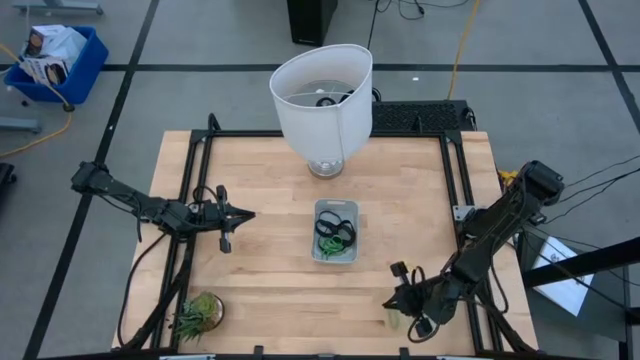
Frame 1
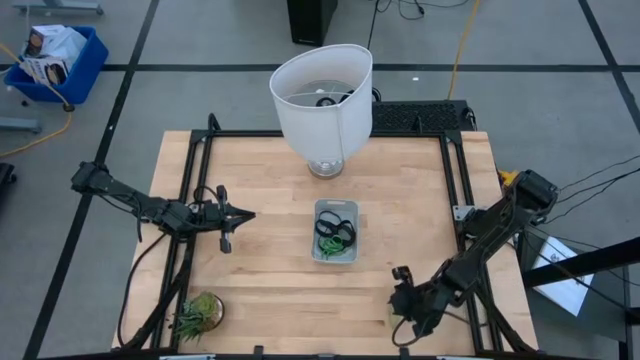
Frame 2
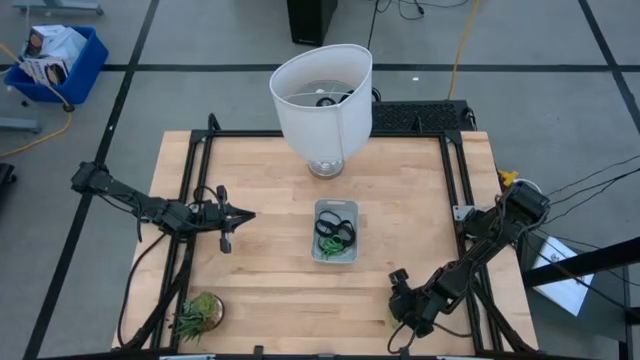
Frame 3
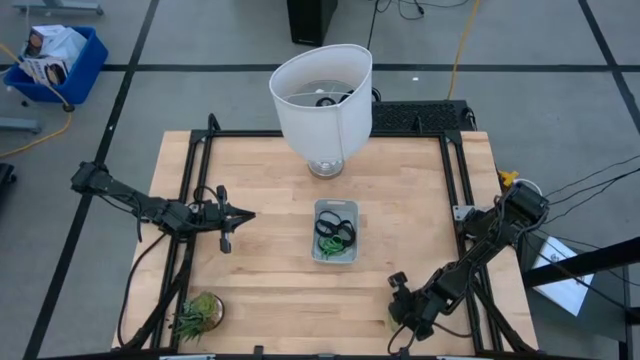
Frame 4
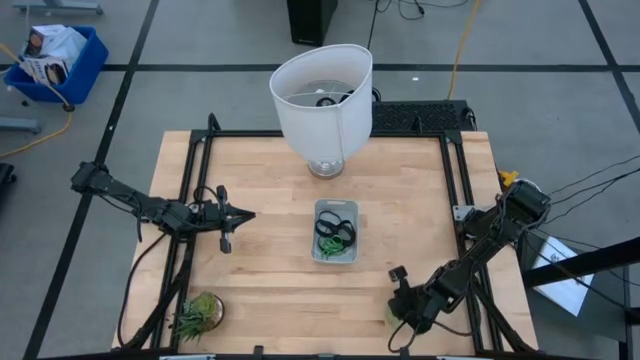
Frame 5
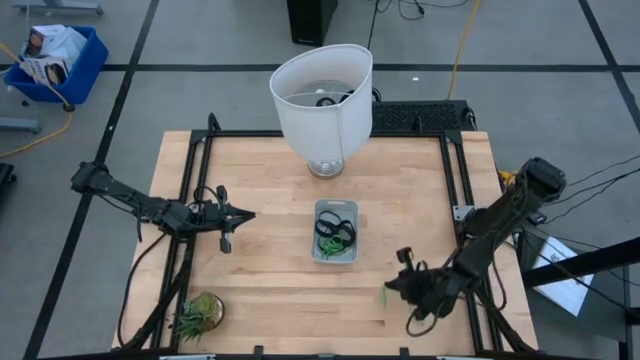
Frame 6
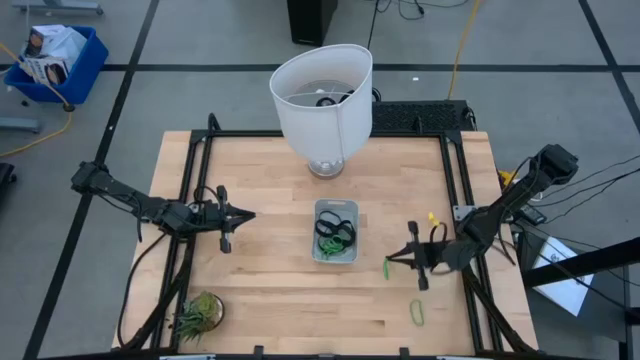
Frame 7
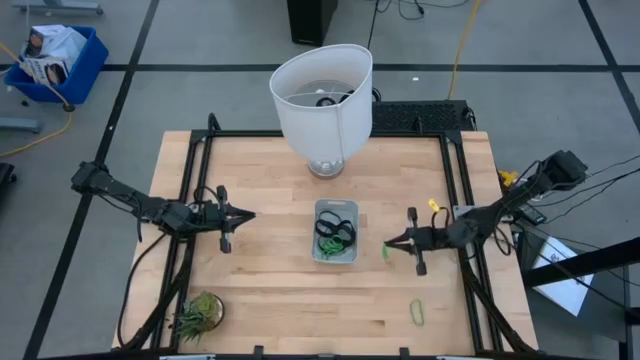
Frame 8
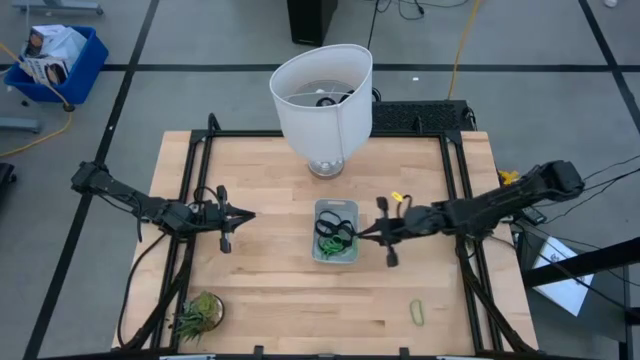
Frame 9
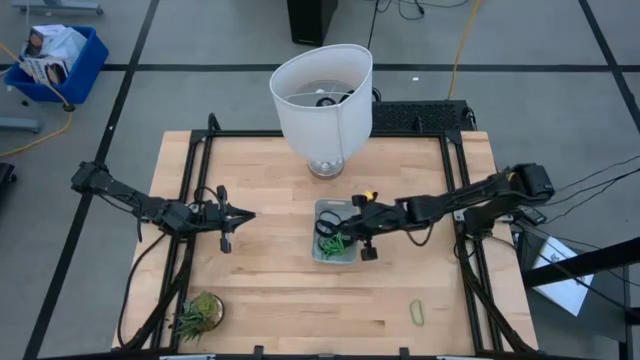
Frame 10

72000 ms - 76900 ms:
Task: Pick and place rubber bands into bin
Put the green rubber band into the gray bin

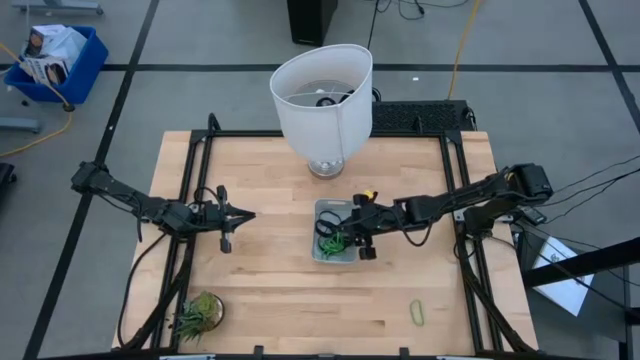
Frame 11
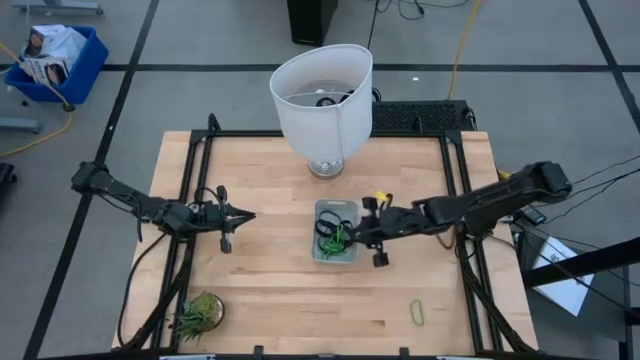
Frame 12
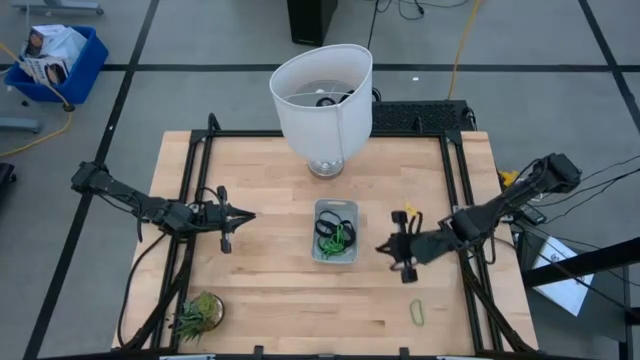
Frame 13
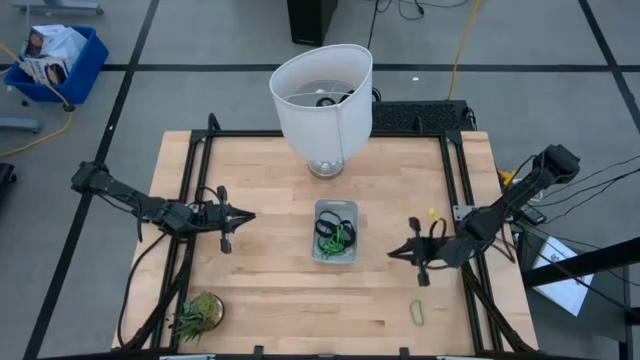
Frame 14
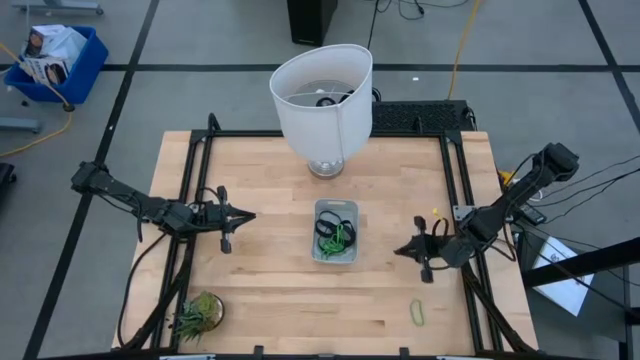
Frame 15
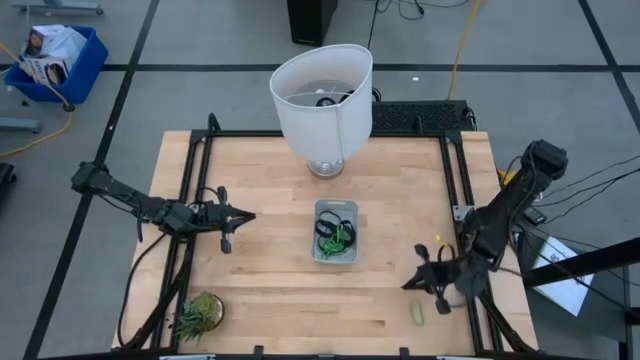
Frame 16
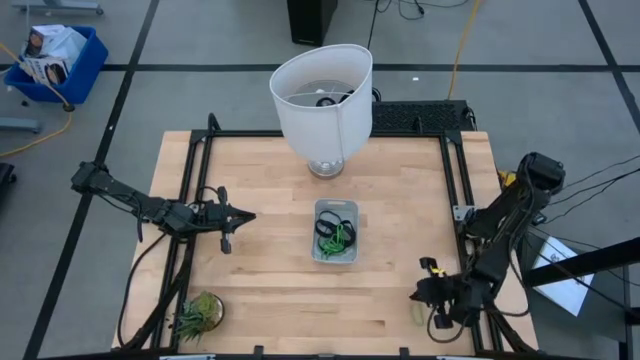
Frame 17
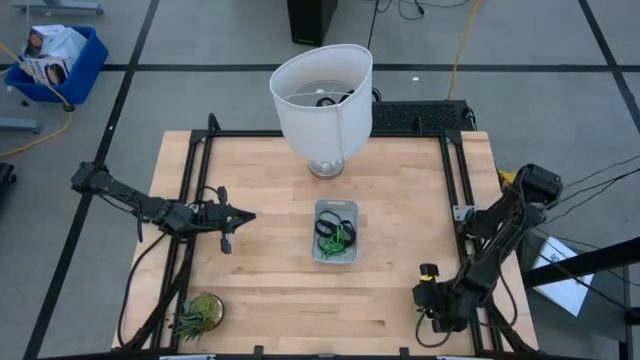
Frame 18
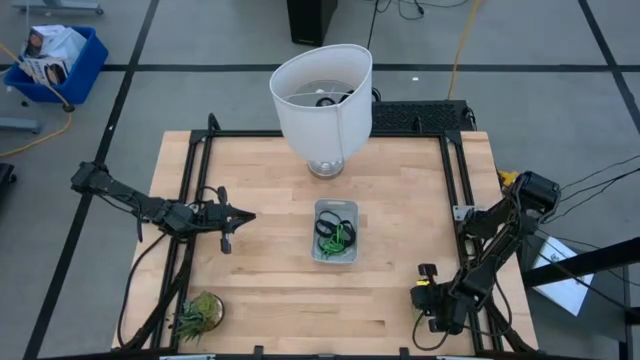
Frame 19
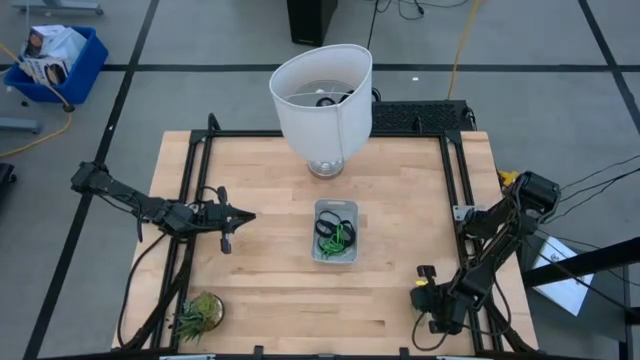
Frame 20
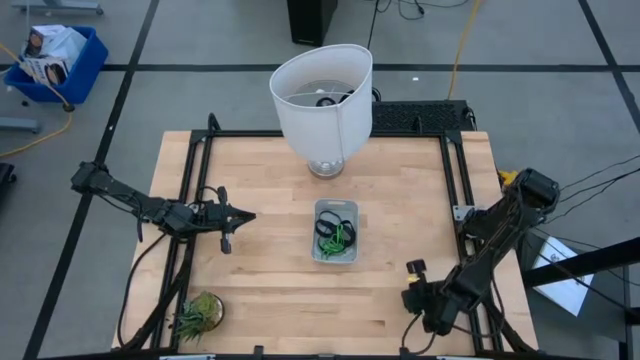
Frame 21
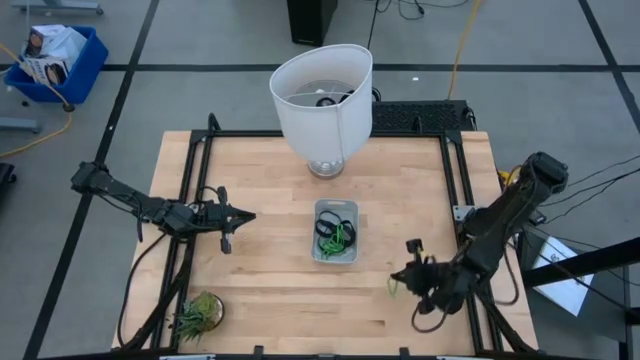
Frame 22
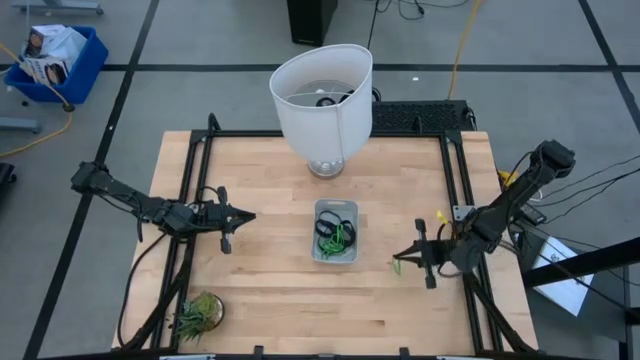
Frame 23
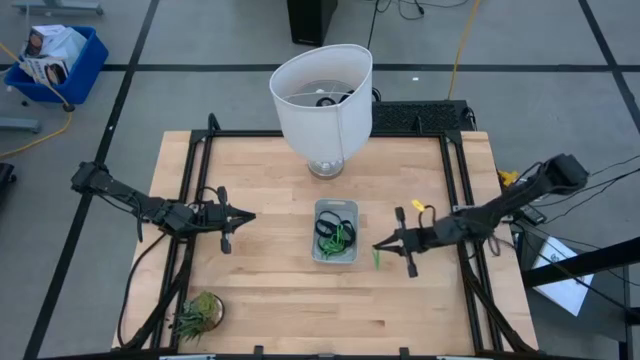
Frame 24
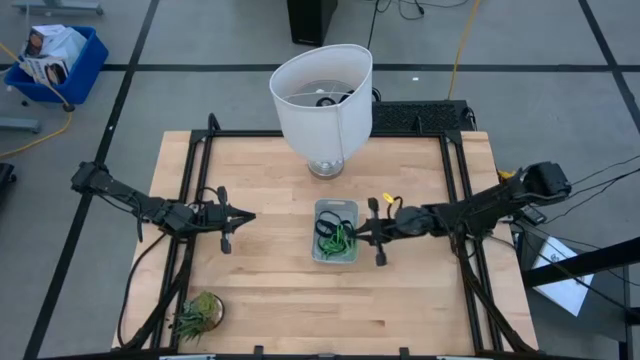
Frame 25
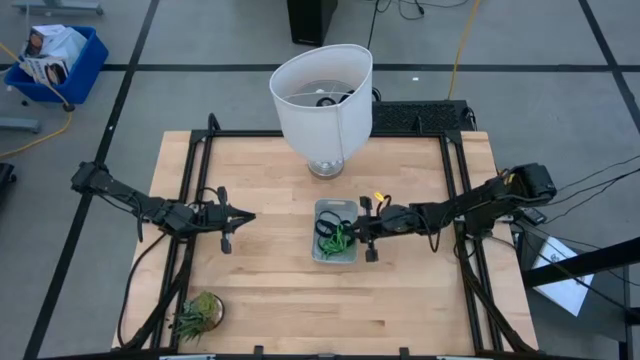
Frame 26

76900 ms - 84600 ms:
Put the green rubber band into the gray bin

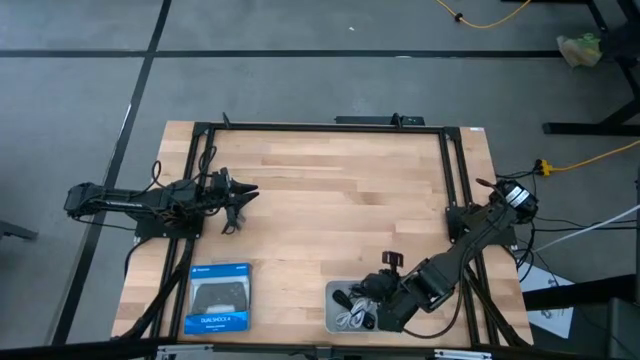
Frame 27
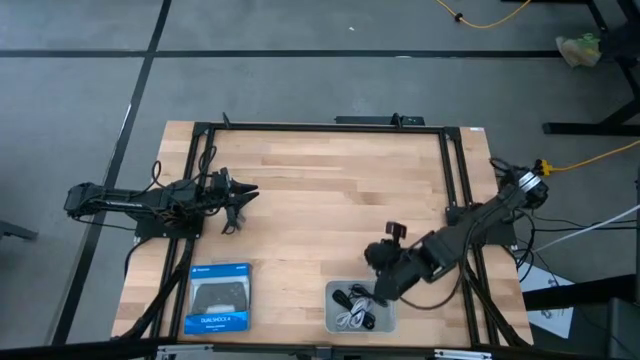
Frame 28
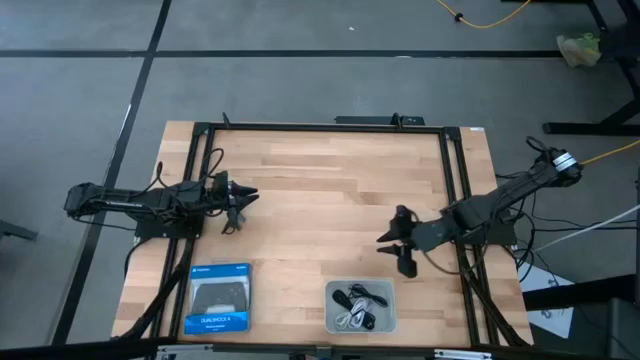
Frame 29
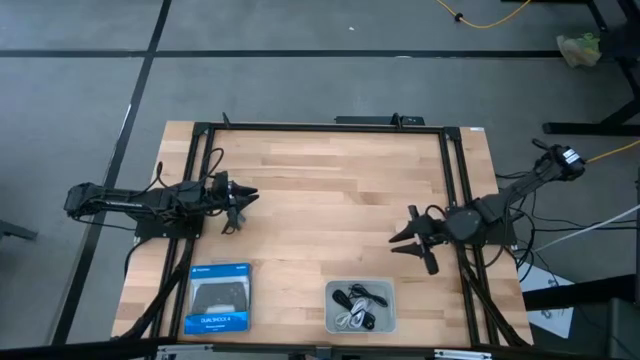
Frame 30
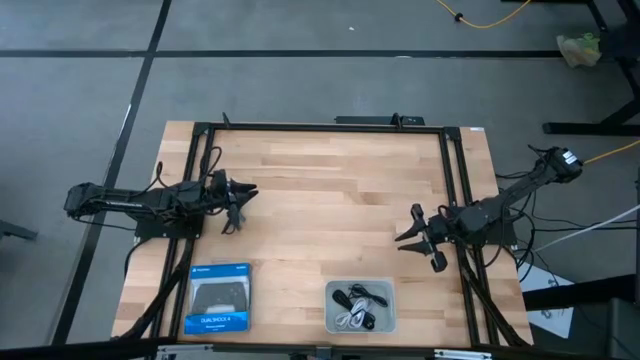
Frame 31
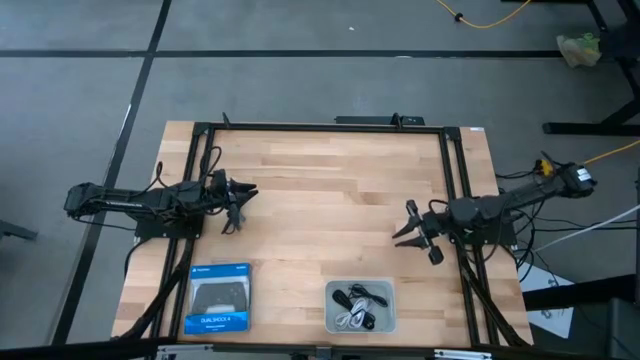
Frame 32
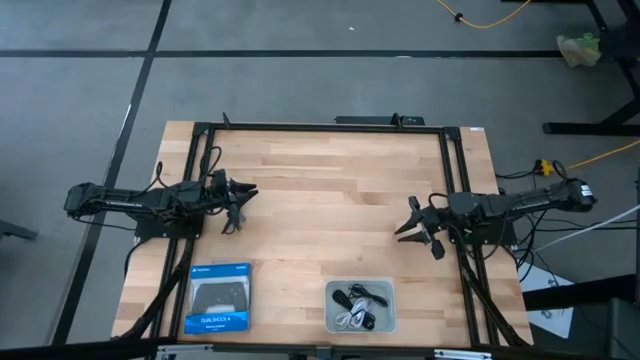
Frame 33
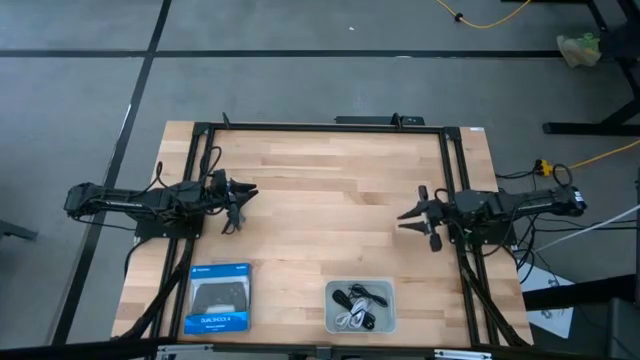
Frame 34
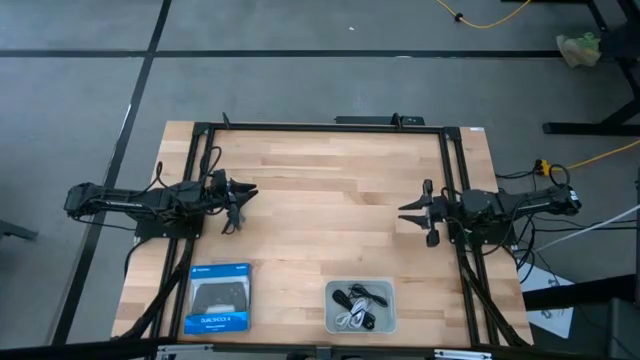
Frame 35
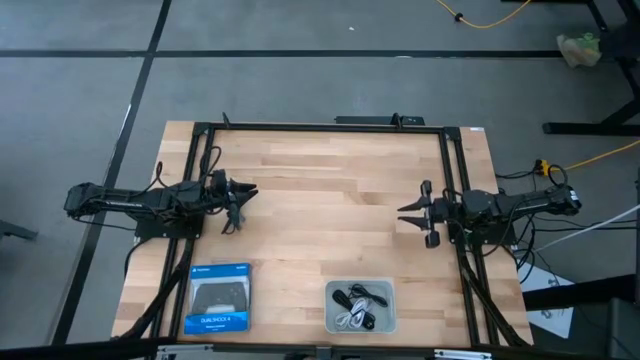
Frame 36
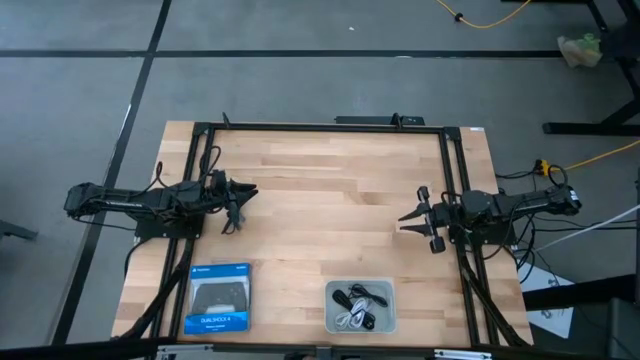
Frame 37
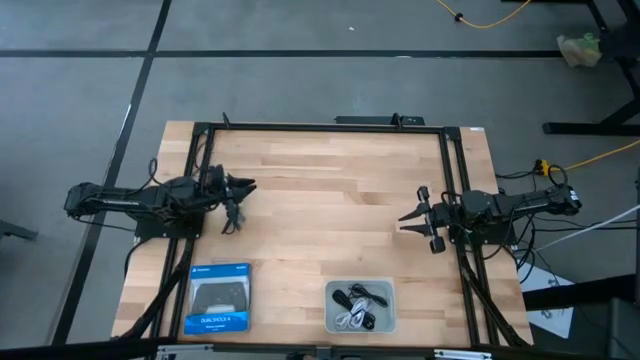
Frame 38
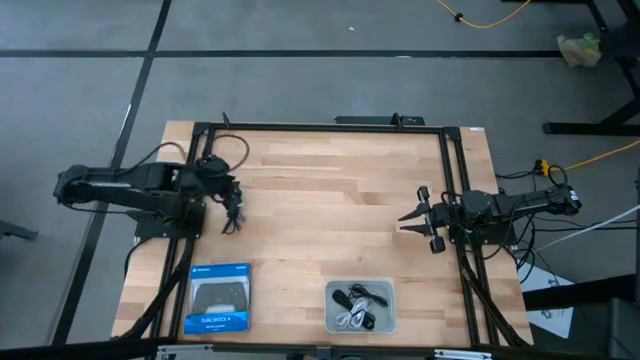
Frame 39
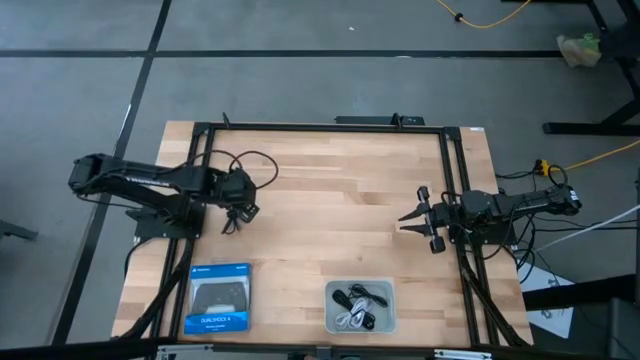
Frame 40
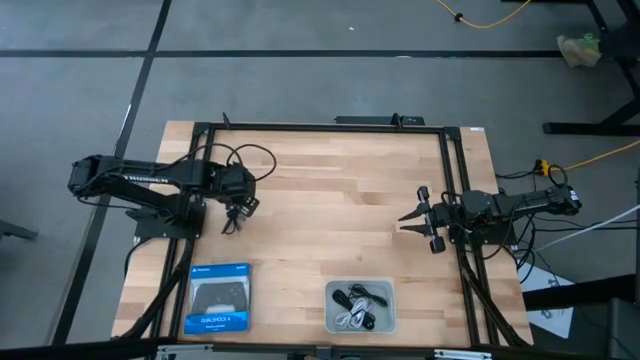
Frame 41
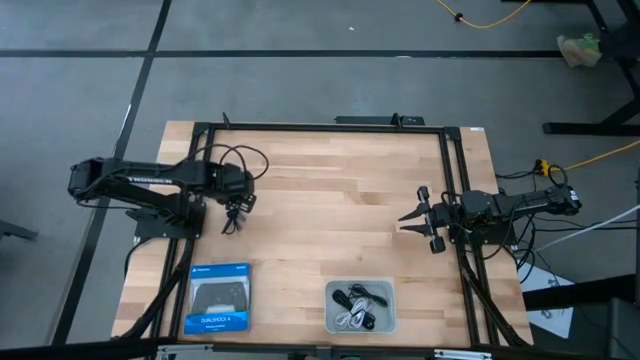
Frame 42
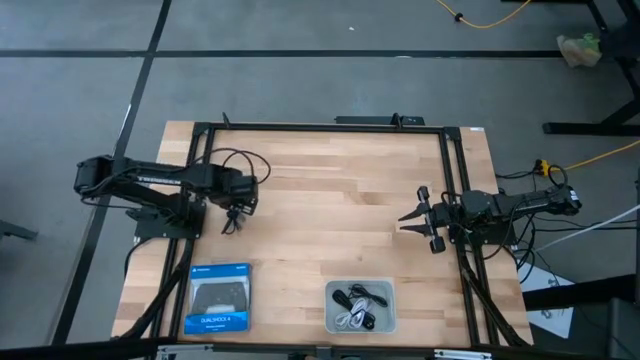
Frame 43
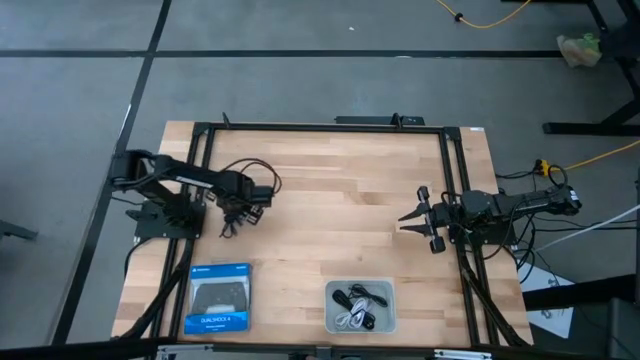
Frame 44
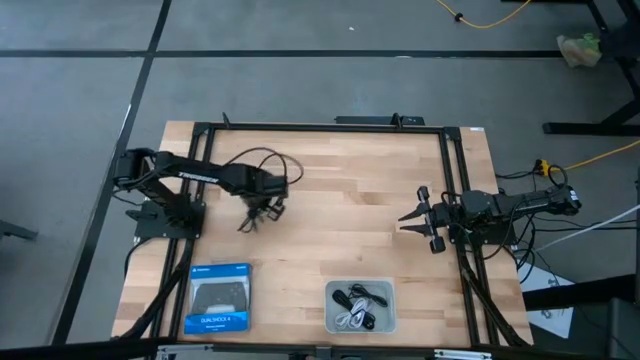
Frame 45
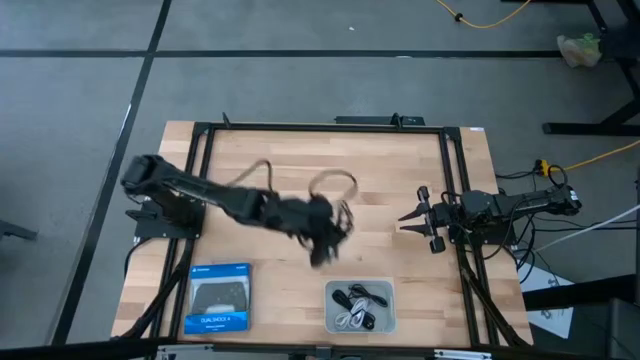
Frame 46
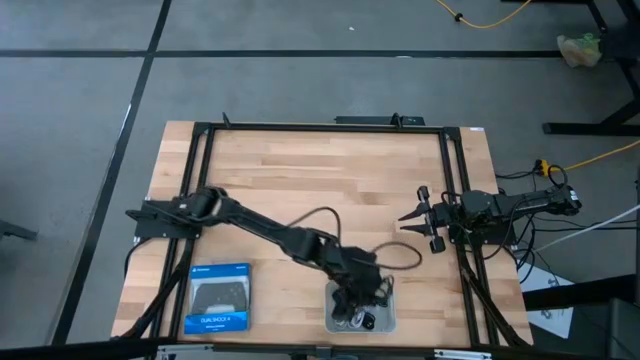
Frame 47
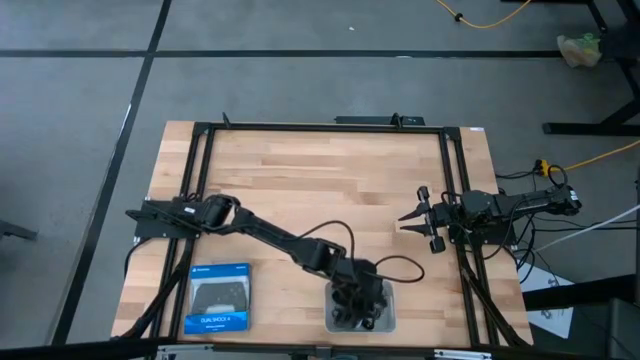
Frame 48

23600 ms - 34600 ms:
Task: Pick and place USB-C Cables
Put the black USB cable into the white bin
